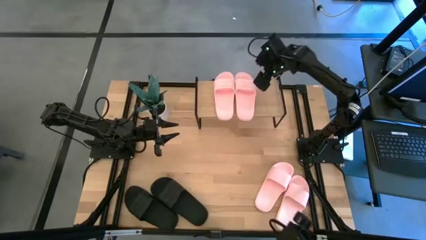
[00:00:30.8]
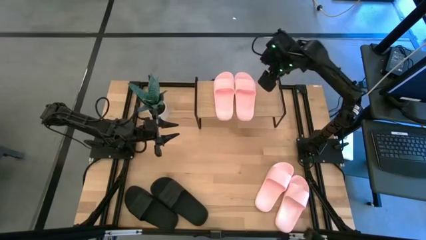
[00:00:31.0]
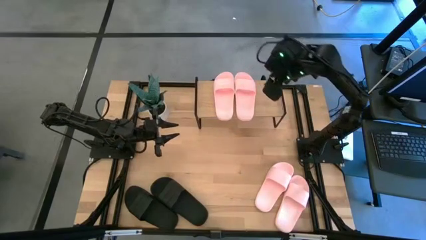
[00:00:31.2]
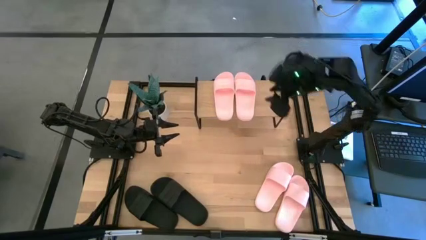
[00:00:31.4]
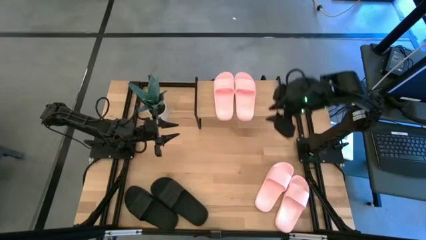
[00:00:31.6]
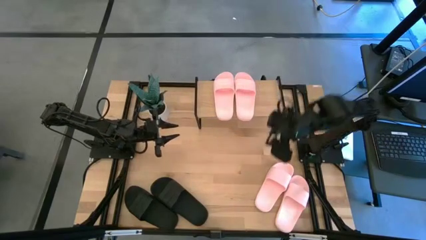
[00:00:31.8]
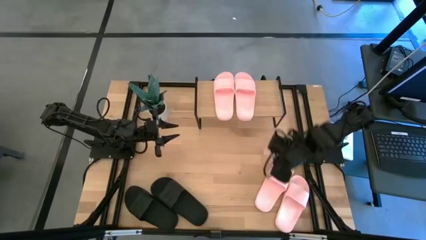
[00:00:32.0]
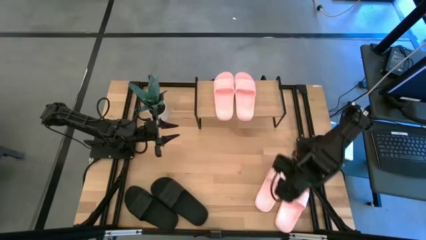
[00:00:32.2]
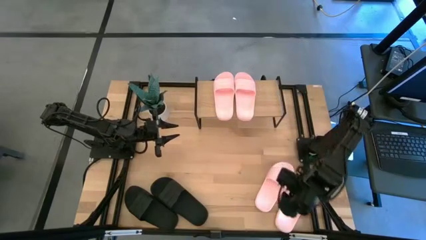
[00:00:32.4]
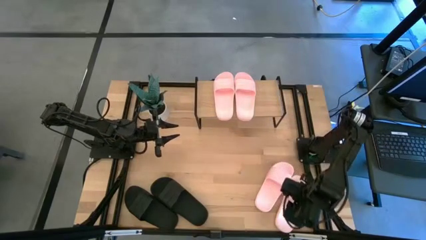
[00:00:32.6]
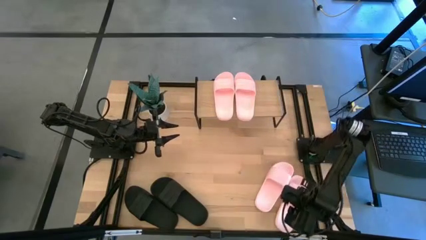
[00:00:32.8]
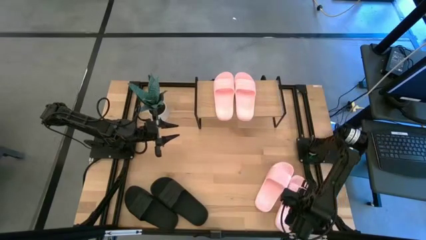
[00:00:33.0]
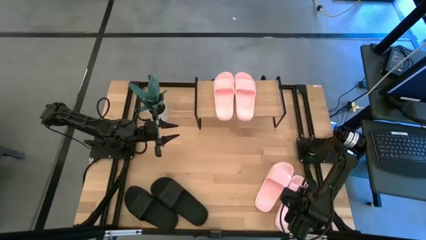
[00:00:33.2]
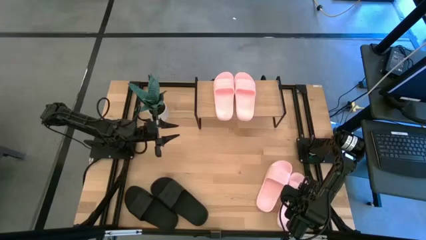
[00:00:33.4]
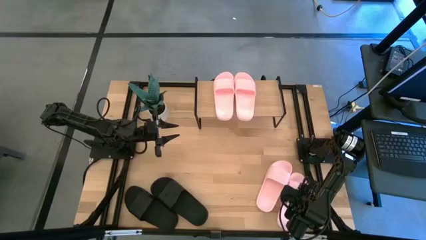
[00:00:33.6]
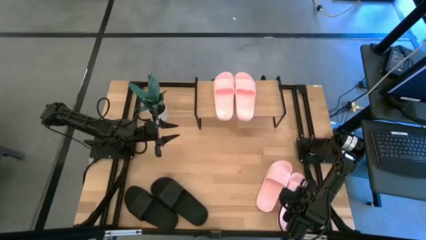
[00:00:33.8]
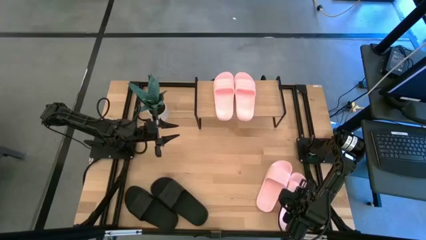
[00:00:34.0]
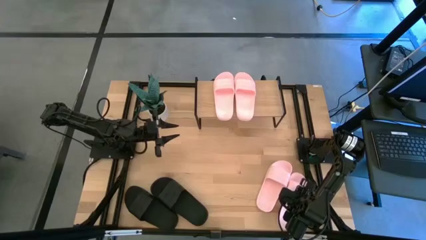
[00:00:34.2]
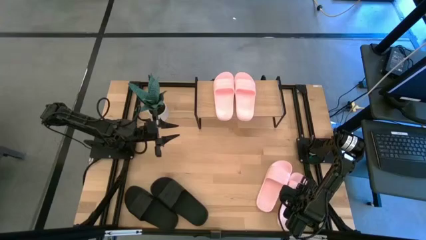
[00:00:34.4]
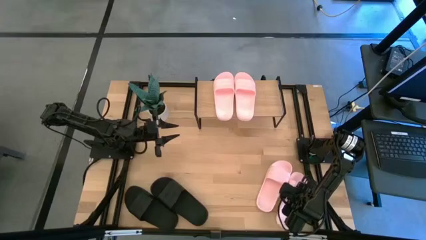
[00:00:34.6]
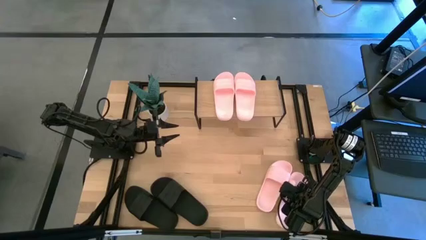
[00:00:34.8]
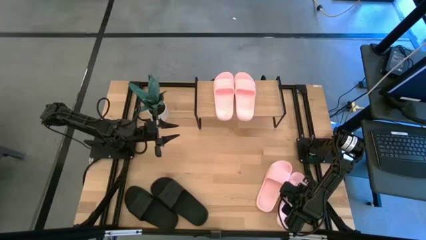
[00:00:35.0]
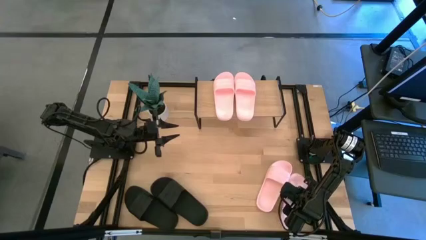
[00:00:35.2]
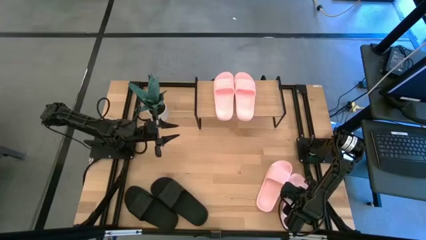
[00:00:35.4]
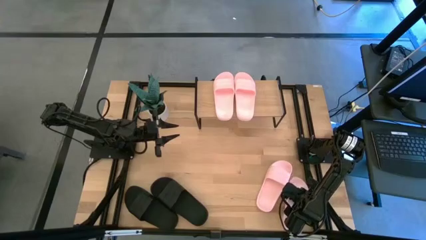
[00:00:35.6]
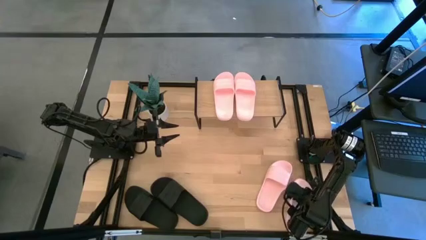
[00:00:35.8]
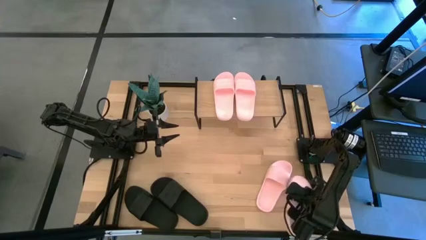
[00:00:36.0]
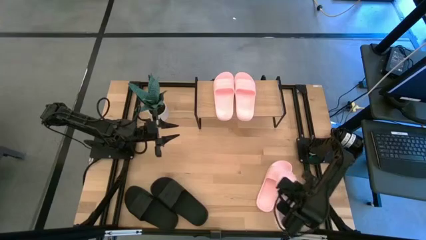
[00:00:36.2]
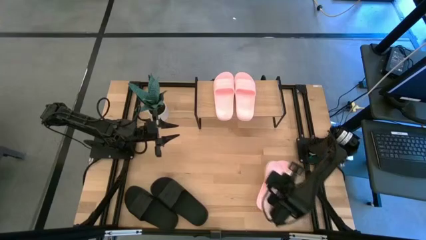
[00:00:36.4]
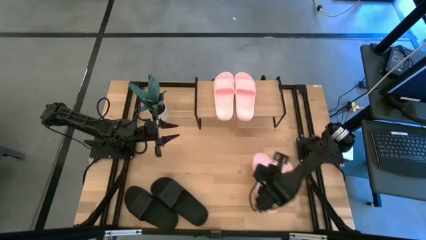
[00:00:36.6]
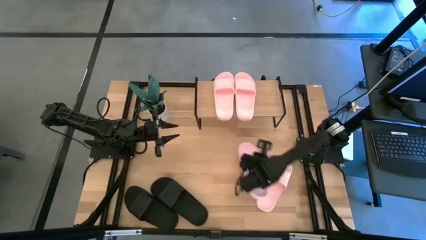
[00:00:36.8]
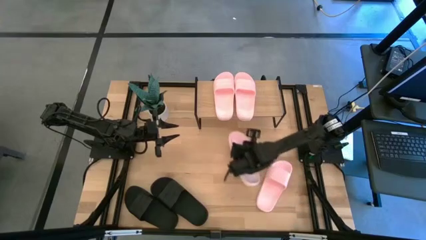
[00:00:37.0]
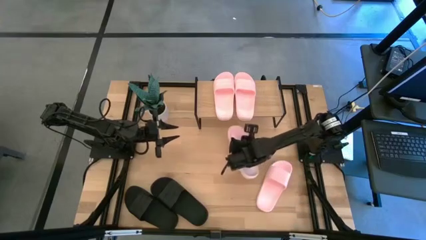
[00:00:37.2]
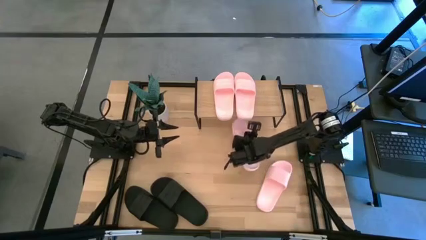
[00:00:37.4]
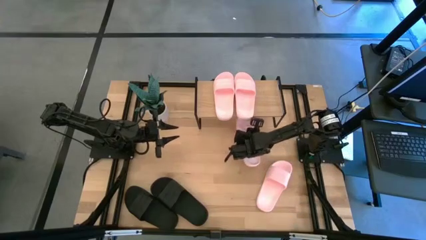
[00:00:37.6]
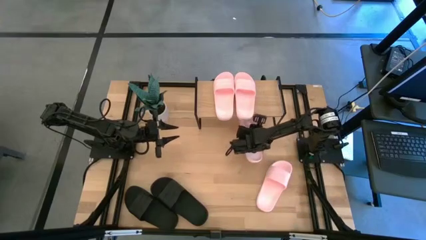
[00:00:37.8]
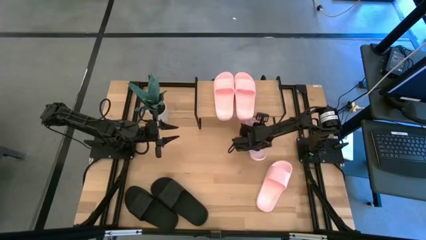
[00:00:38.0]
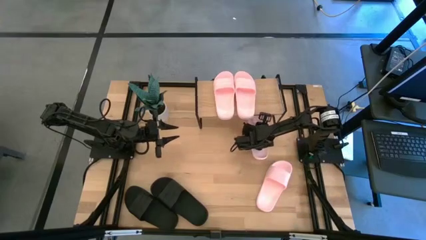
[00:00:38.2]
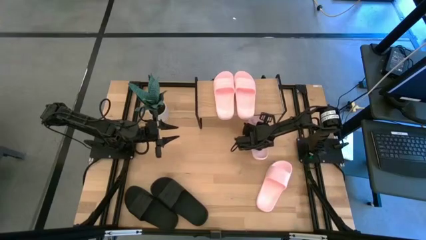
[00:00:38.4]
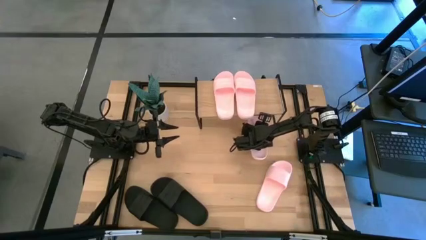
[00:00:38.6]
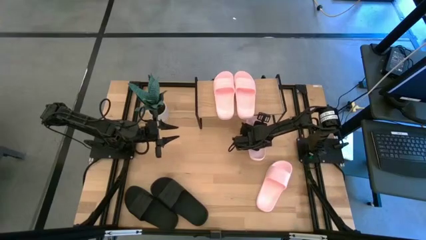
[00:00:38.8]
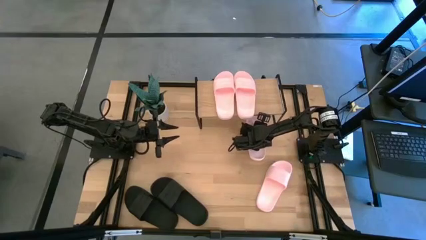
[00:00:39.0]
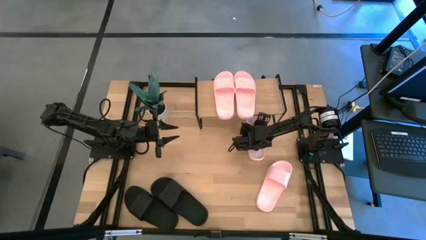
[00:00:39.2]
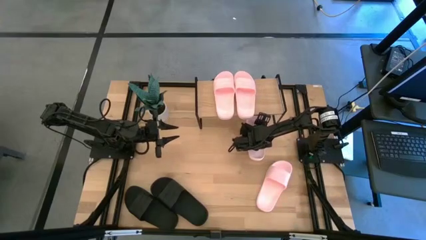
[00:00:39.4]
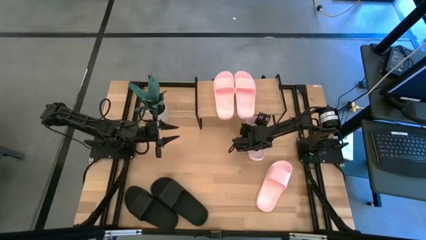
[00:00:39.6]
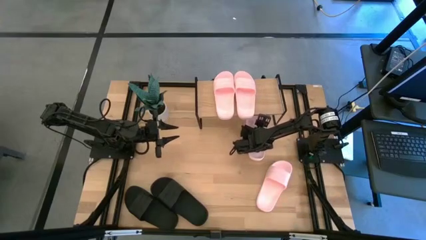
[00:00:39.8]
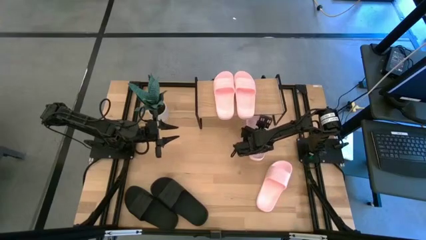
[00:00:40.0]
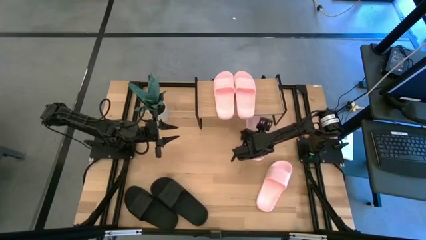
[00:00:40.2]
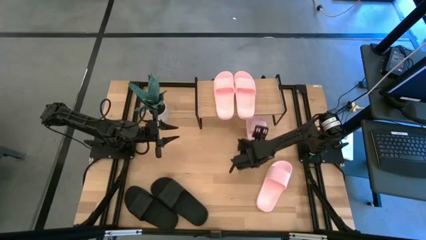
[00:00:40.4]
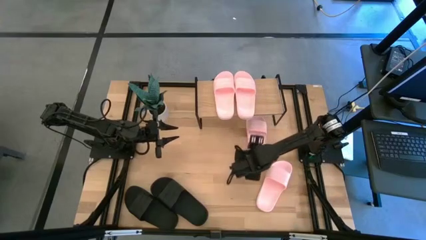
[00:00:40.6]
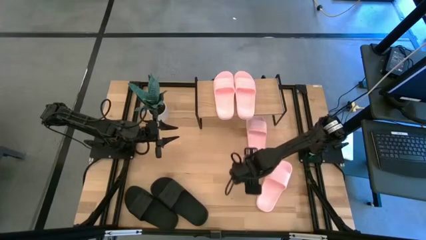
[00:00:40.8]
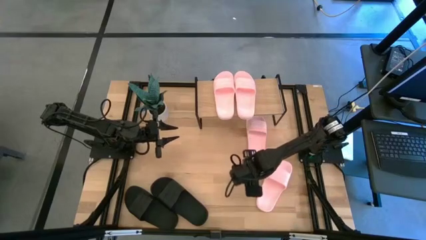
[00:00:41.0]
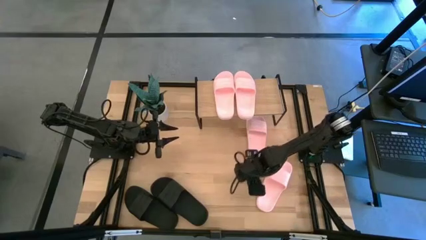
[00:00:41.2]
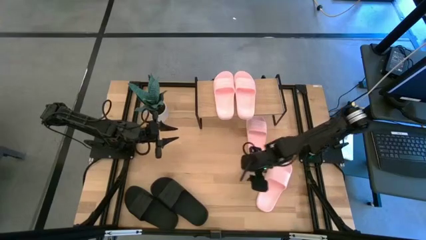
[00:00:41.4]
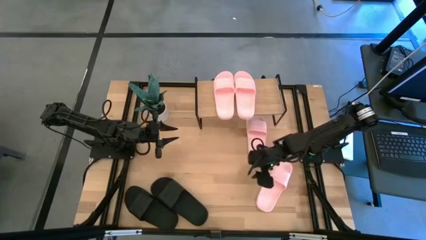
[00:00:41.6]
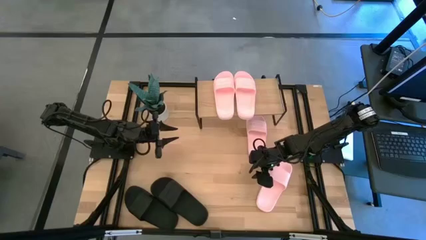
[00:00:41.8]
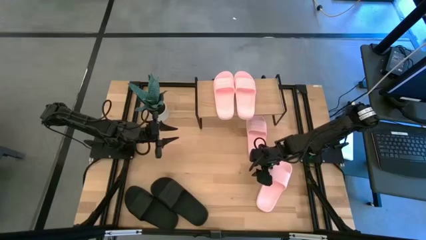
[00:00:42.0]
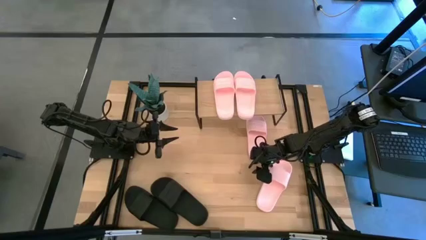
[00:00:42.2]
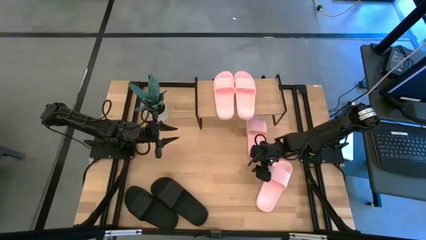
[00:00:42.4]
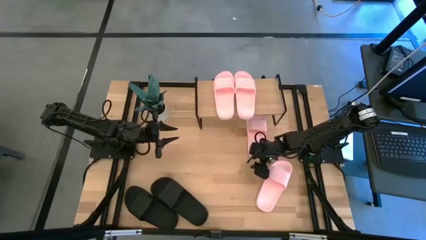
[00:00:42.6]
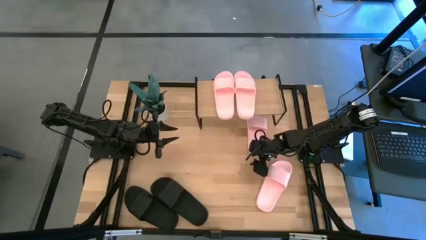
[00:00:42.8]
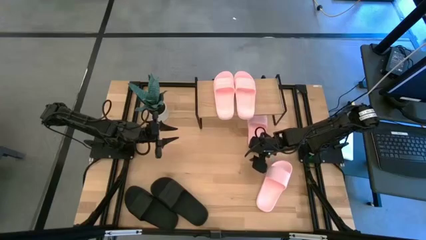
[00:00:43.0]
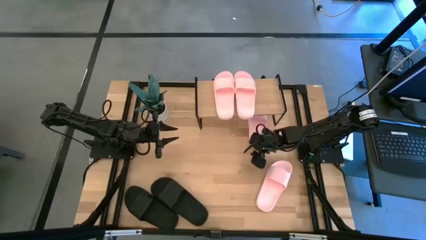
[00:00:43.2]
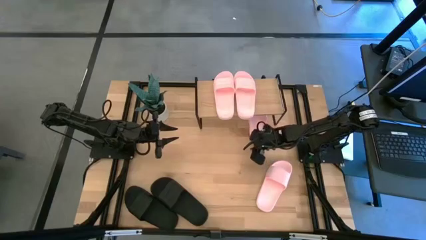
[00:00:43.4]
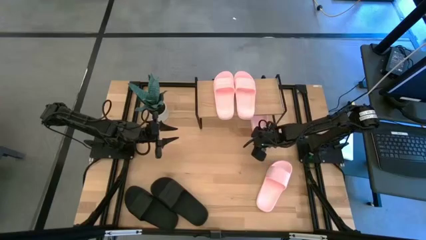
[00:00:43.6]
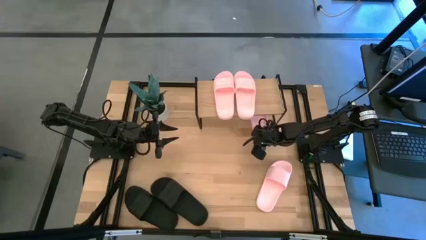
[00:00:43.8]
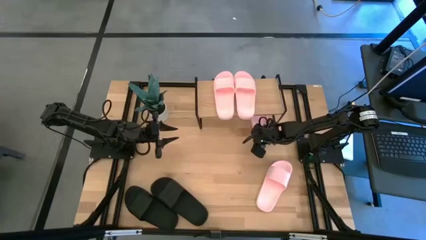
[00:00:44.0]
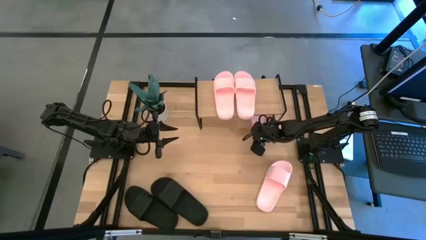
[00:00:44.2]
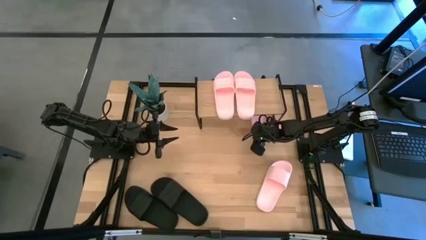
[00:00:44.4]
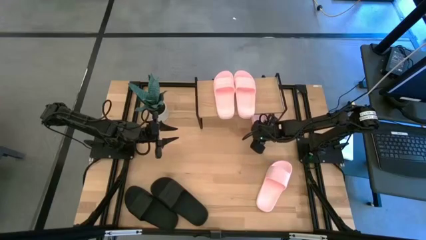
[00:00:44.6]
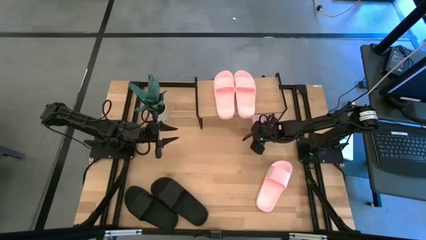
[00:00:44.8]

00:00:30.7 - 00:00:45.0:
Task: Pick and place slides into the shelf
Put the pink slipper under the shelf
